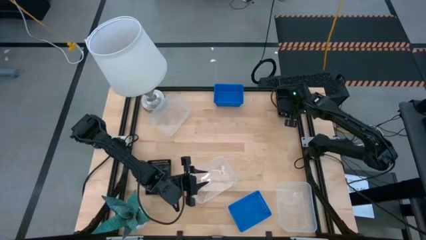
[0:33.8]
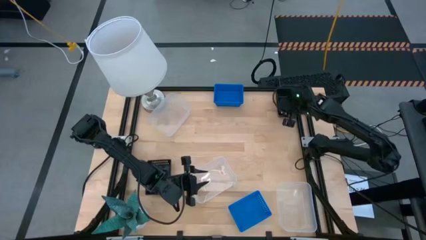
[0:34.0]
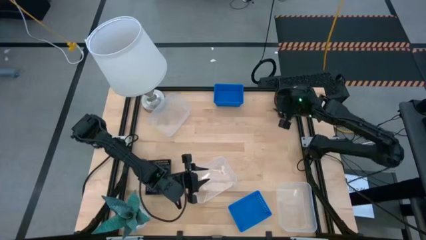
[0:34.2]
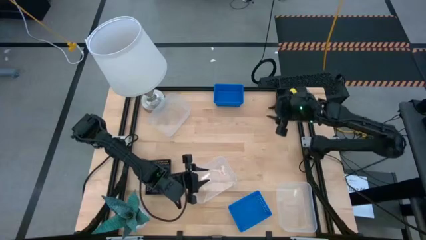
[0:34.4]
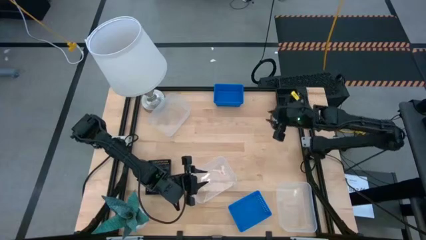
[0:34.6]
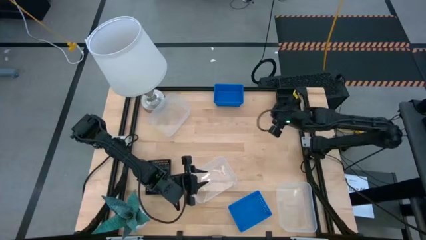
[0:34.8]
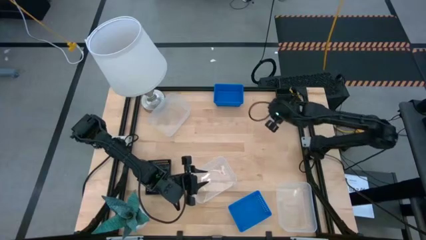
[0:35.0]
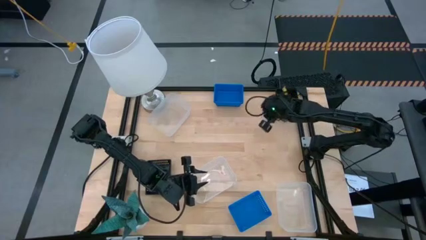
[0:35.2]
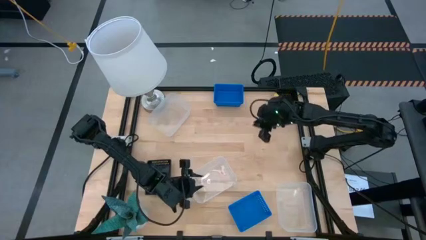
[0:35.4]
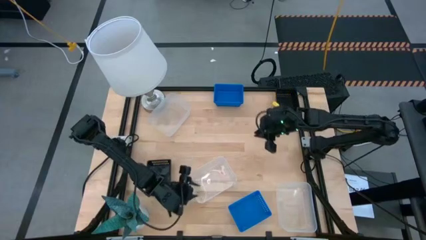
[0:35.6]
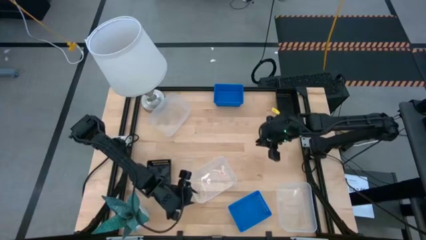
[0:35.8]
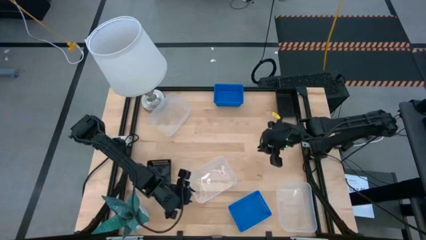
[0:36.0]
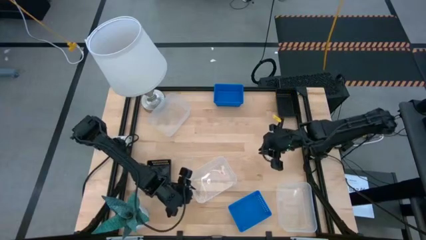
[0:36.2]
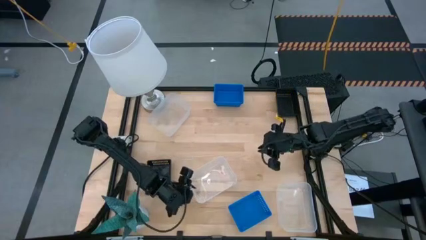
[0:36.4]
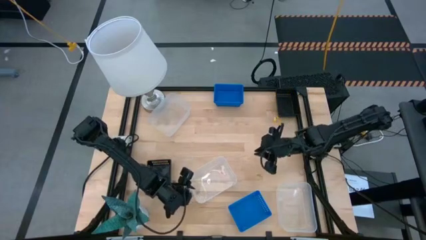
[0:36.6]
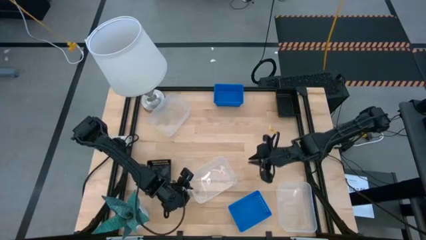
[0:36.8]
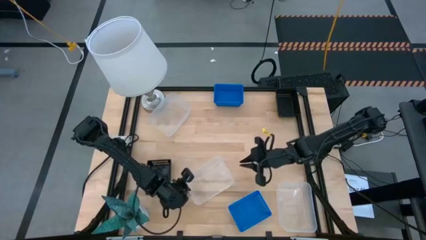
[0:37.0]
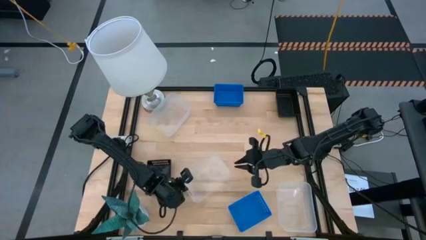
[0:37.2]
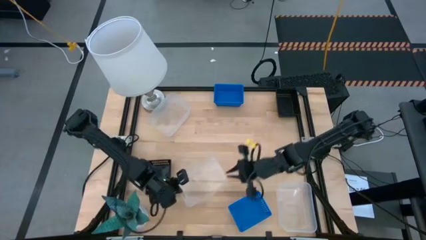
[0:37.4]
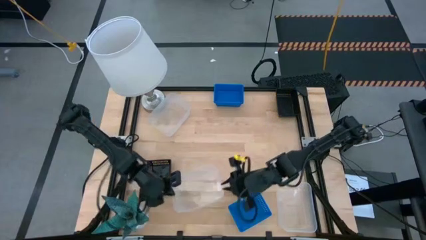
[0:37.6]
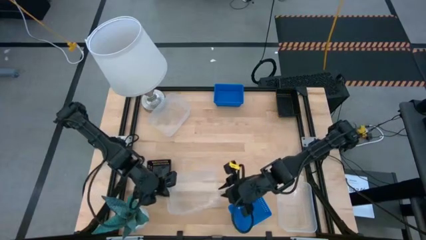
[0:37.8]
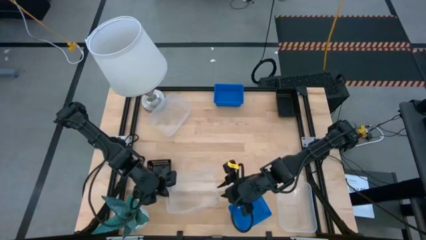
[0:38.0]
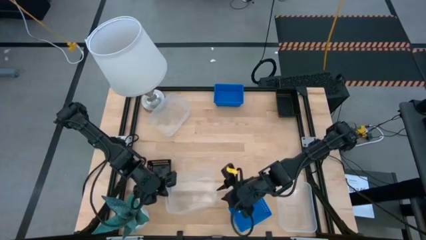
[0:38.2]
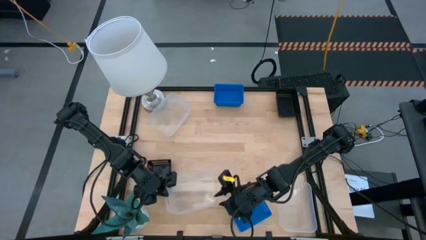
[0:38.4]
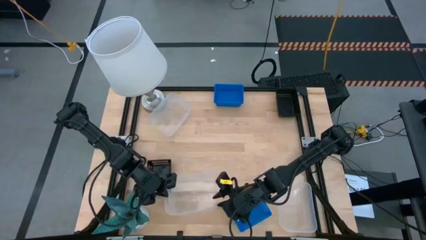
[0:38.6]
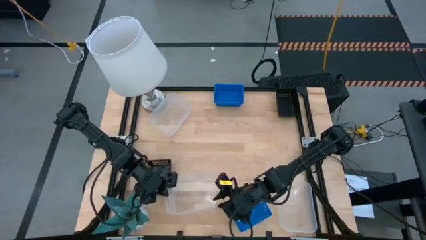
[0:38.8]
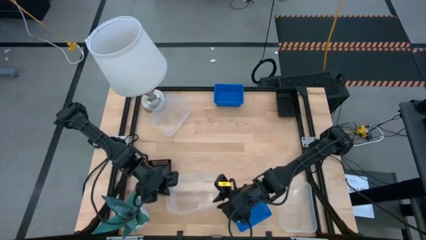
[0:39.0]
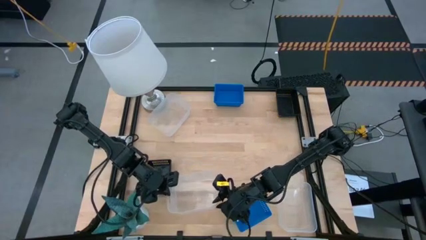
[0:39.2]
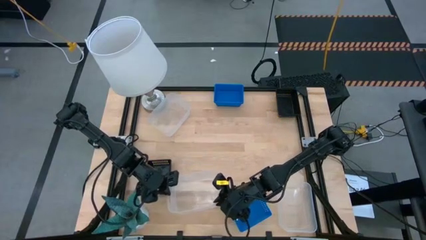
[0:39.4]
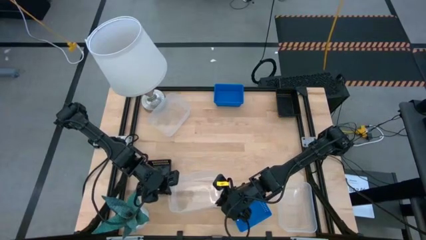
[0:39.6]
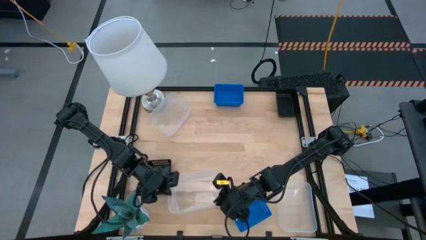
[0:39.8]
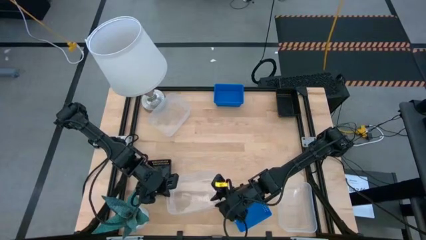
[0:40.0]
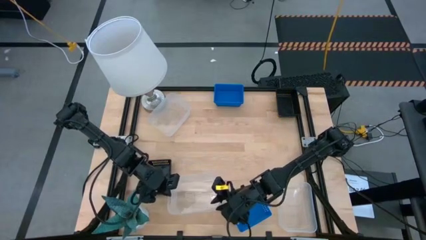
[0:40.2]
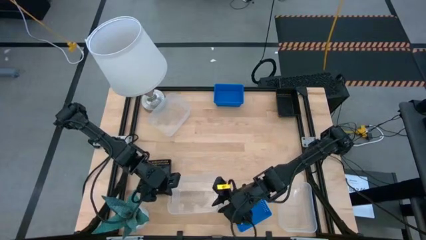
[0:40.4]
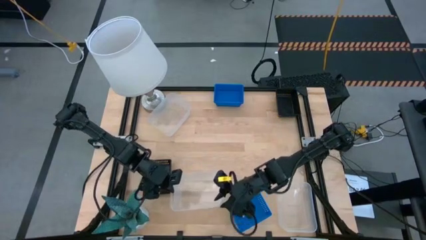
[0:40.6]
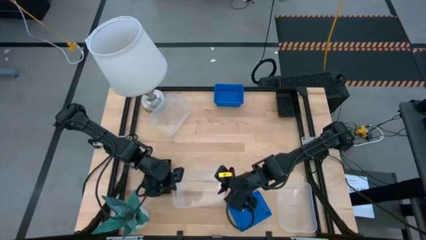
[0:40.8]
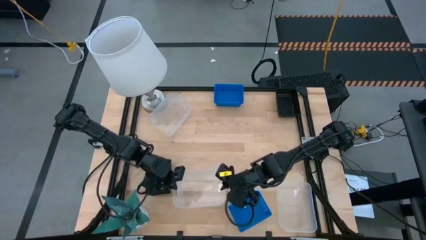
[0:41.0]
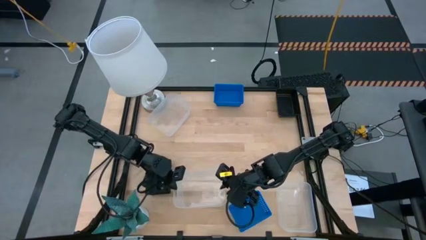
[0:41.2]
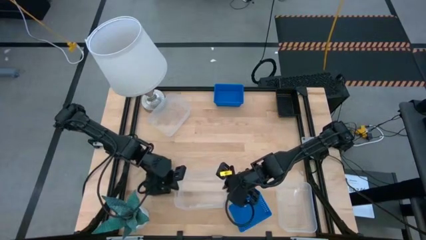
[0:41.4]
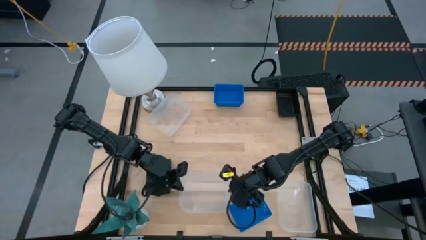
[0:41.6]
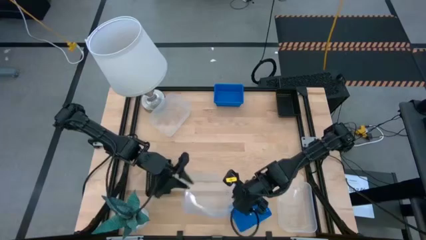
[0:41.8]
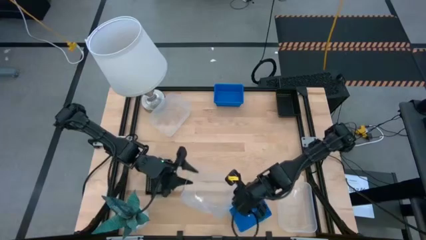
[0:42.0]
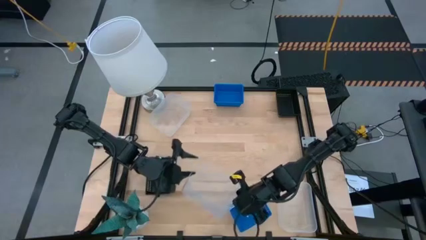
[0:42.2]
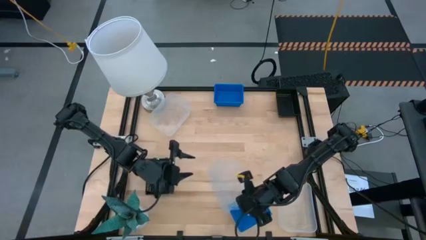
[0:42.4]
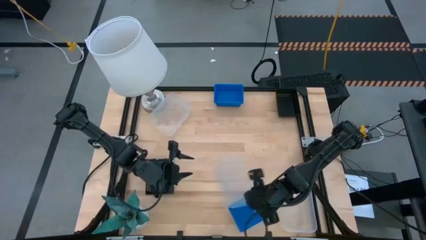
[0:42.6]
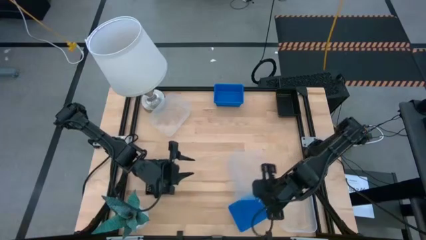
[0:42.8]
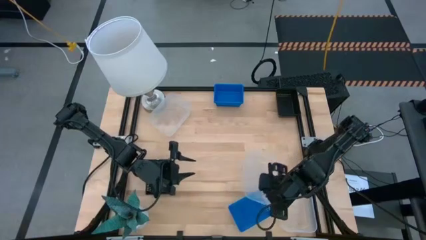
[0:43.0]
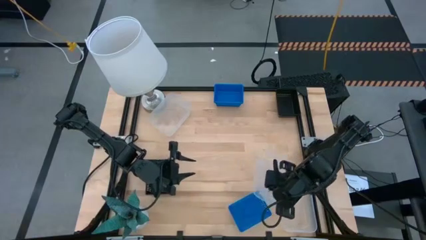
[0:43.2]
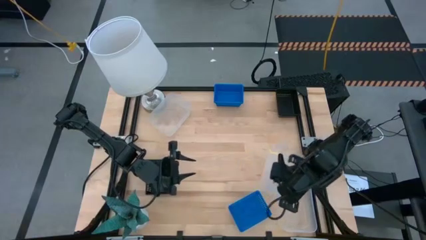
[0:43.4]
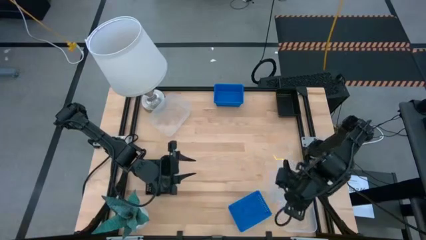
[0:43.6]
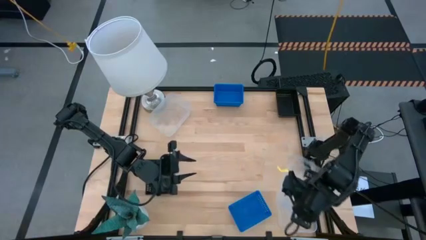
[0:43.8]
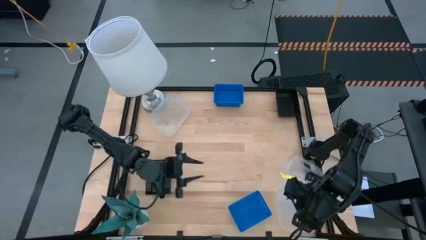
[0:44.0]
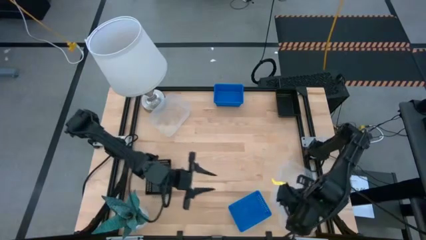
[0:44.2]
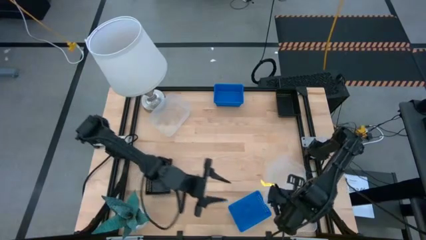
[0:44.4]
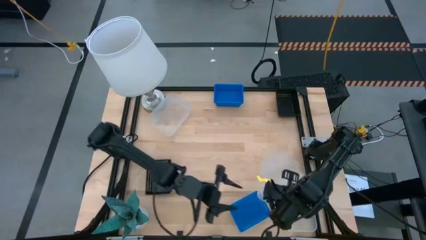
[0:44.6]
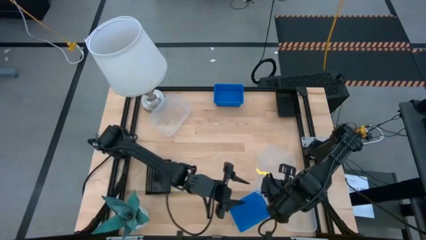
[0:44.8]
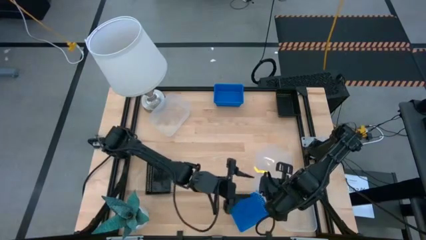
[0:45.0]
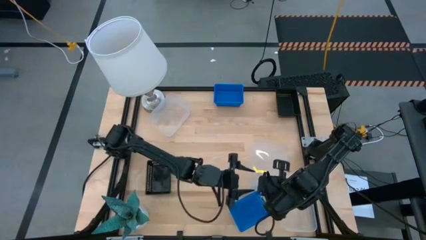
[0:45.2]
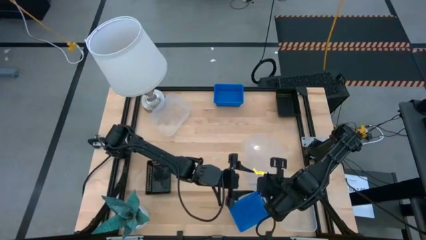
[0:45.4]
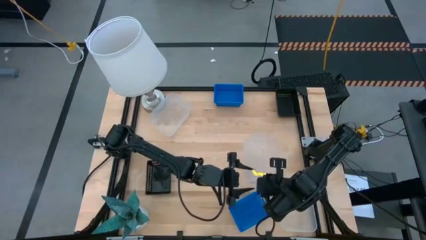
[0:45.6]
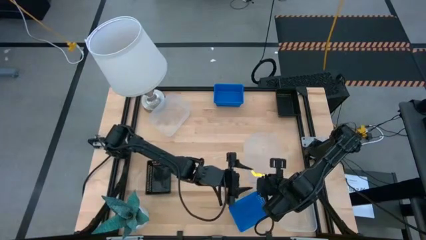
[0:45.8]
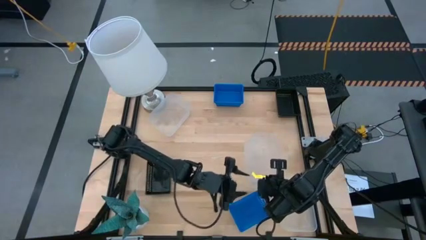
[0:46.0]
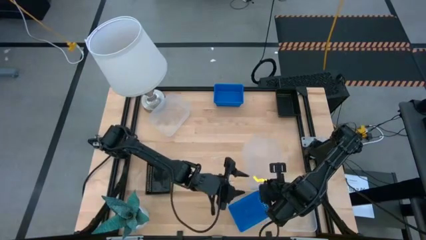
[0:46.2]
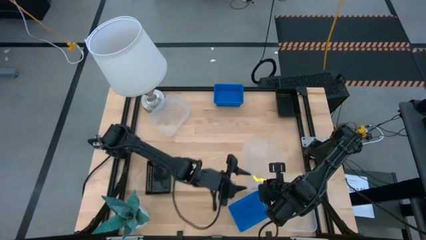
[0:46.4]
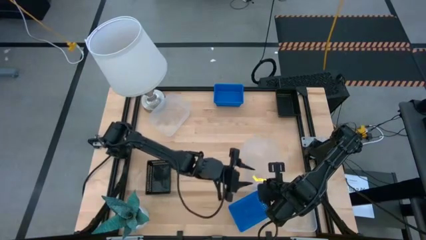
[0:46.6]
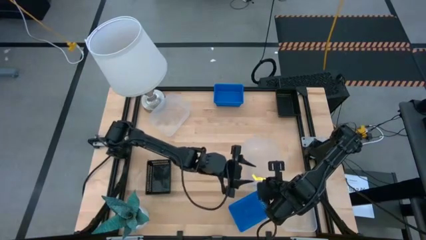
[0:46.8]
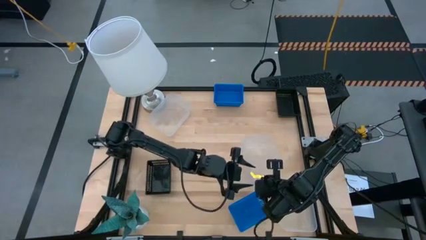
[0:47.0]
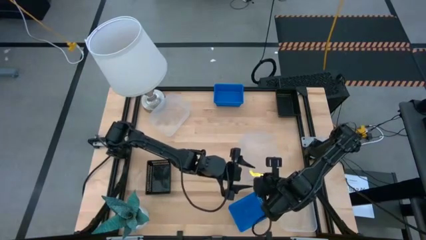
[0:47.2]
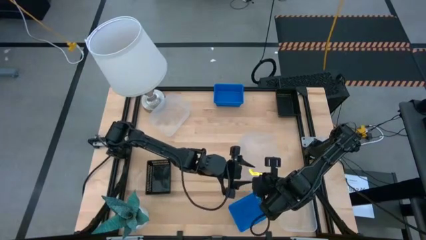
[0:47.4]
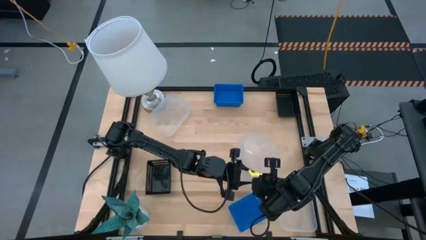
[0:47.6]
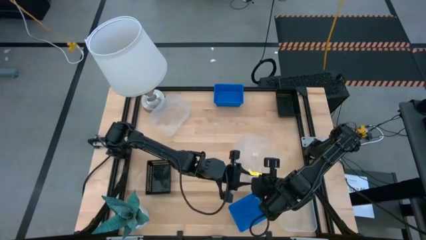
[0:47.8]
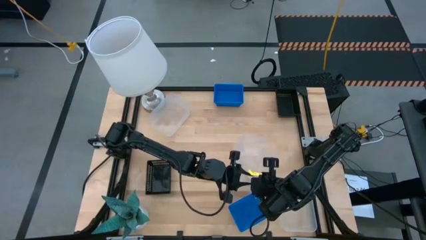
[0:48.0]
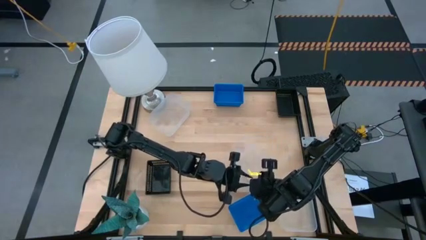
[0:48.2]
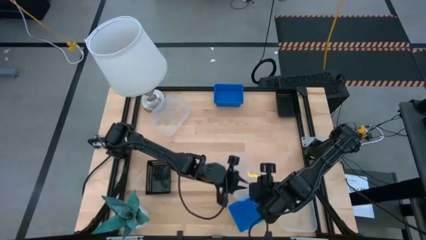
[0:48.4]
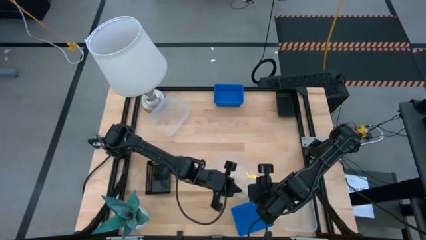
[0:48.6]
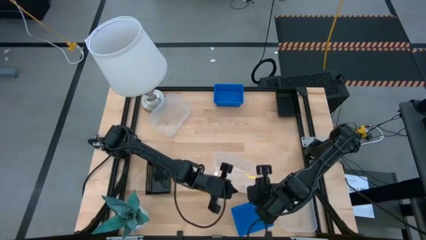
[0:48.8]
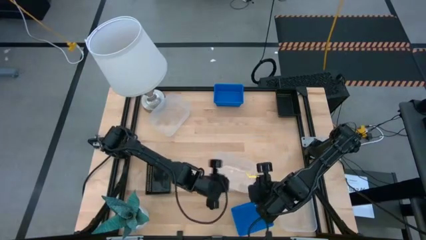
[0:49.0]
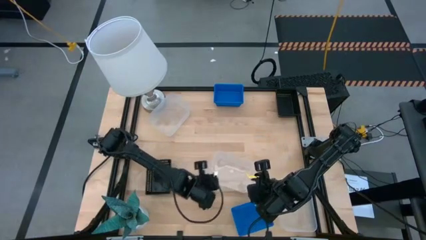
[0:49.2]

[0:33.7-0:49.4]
Stack the middle transparent bin on top of the bottom transparent bin
